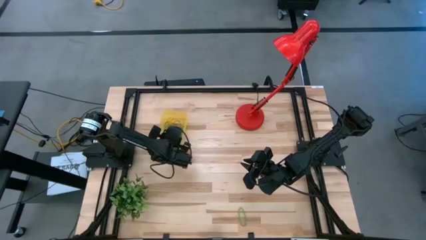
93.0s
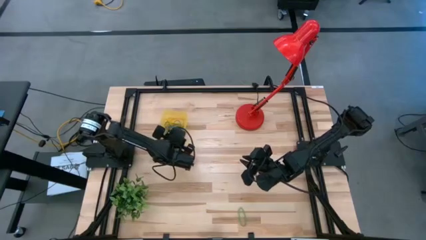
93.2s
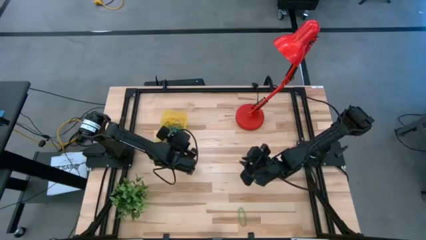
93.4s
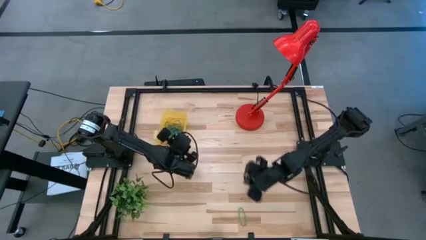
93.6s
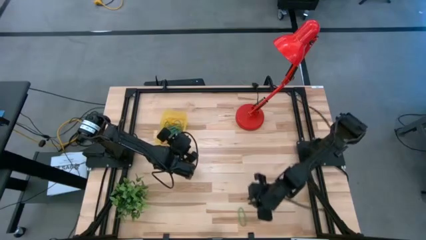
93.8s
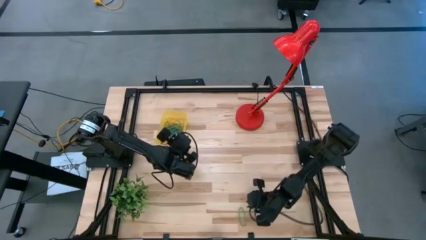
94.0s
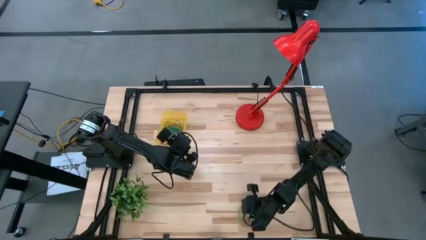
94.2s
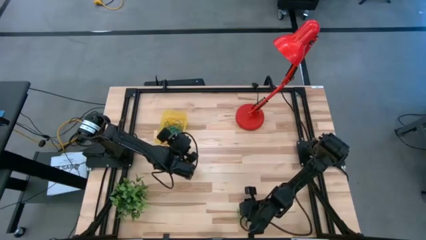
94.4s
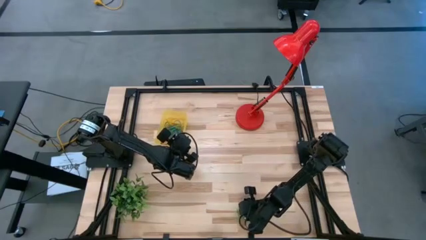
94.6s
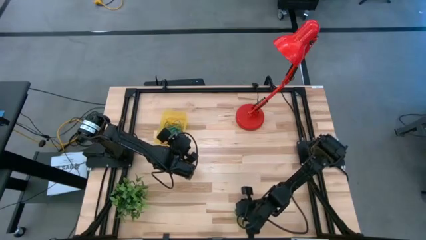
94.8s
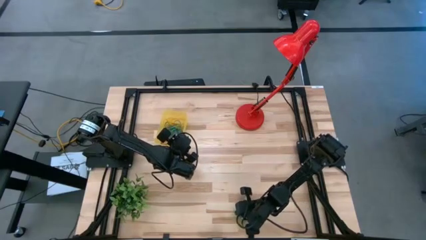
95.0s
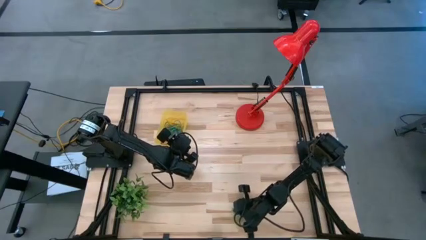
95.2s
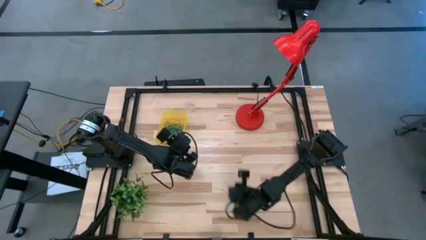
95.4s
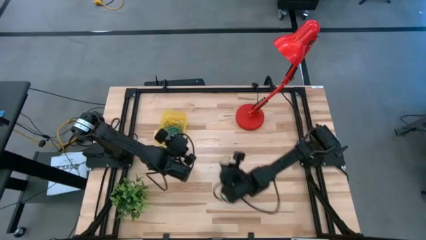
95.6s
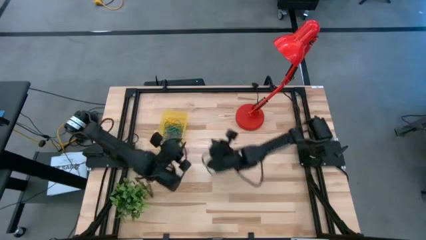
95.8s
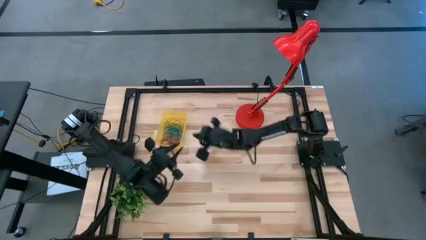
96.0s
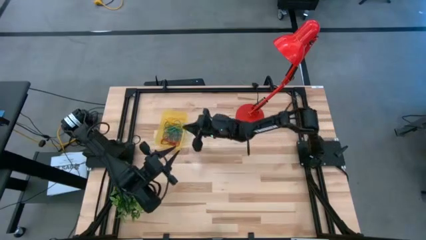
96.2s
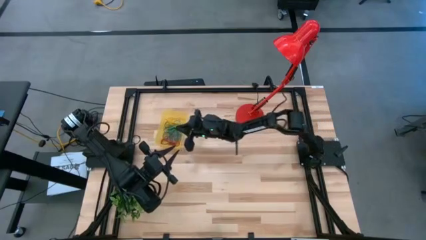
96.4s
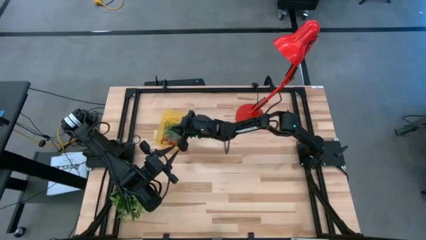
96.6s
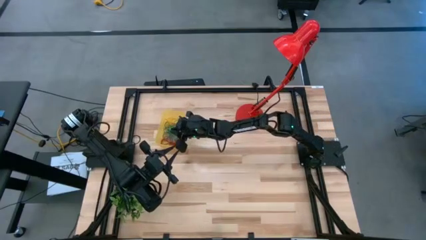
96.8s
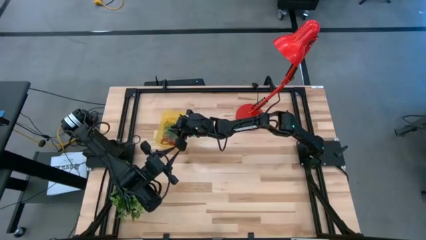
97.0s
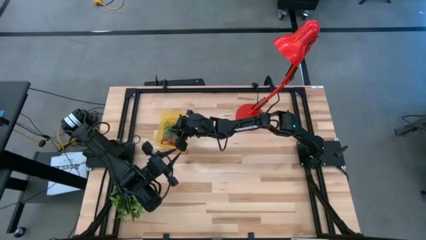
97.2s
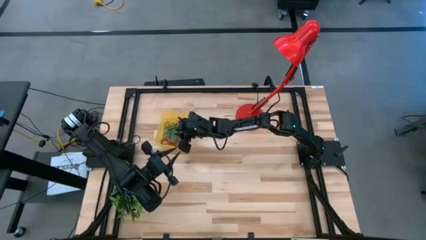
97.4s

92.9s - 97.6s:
Task: Pick and place items into bin
Put the green rubber band into the yellow bin

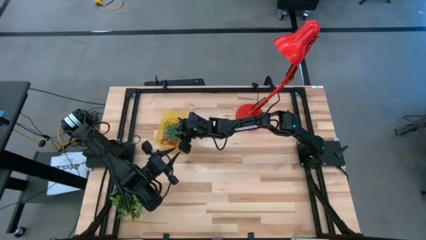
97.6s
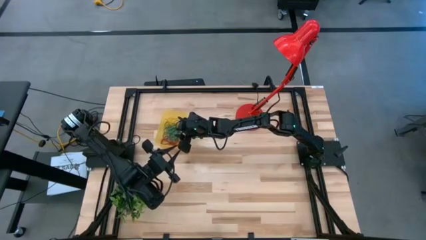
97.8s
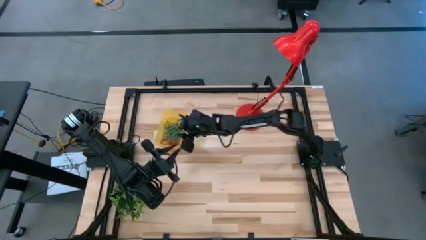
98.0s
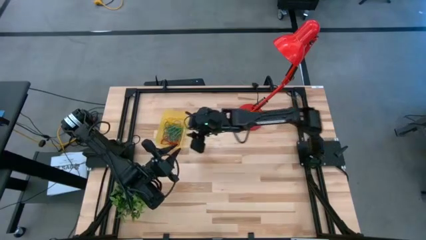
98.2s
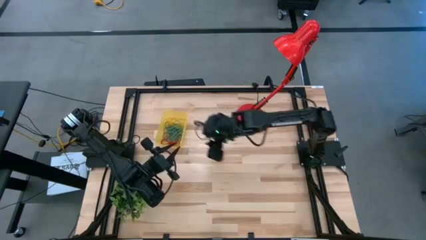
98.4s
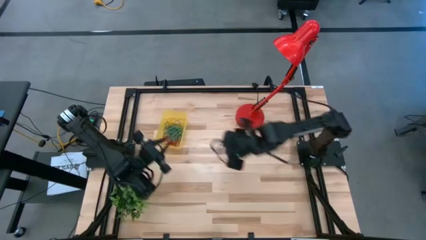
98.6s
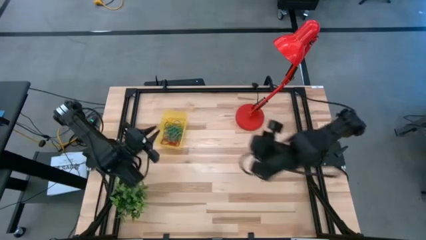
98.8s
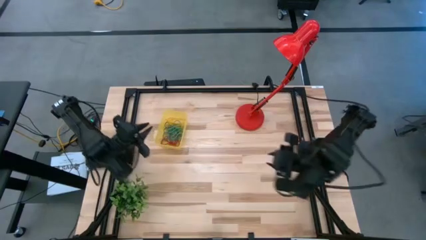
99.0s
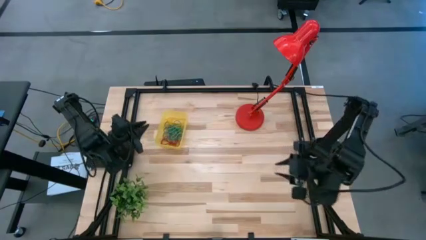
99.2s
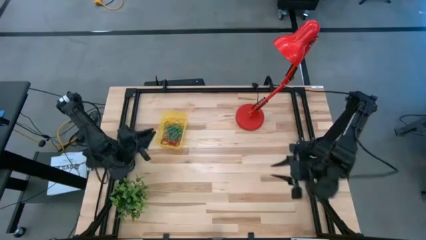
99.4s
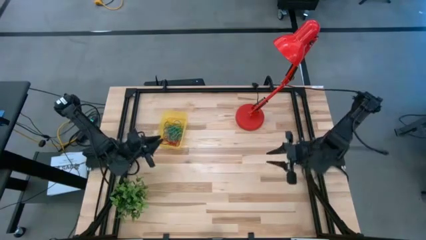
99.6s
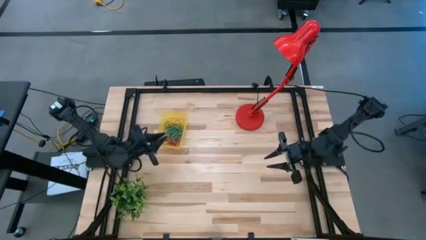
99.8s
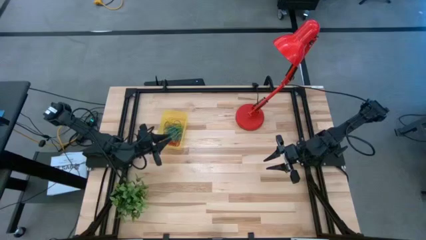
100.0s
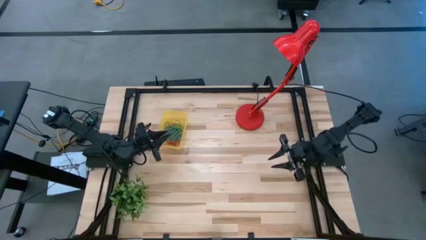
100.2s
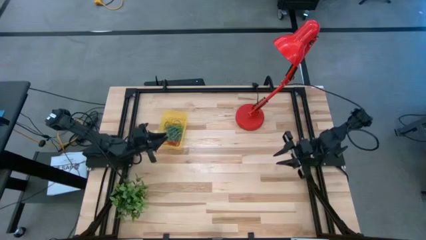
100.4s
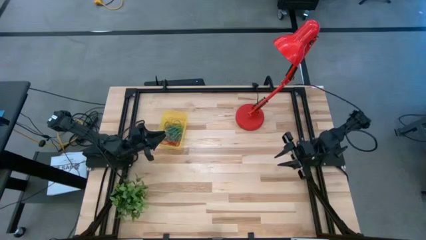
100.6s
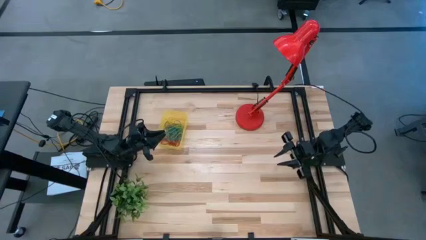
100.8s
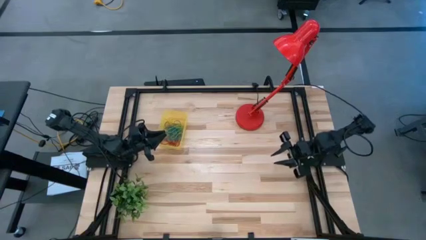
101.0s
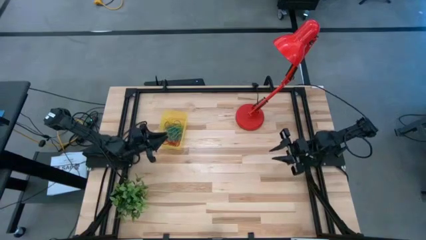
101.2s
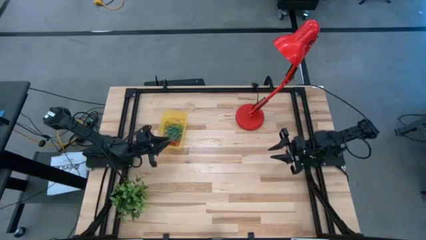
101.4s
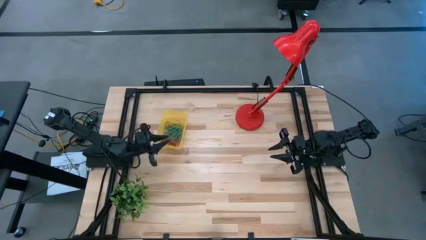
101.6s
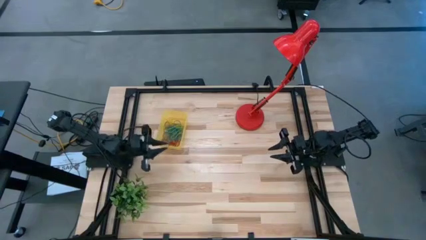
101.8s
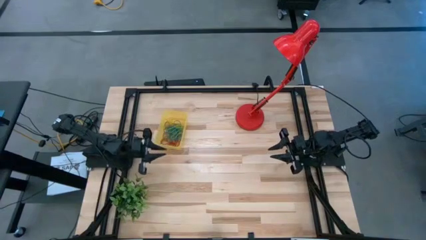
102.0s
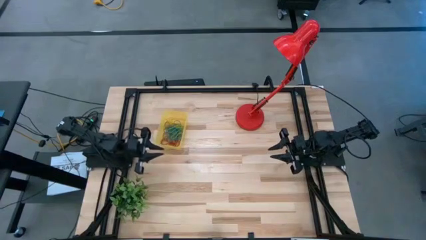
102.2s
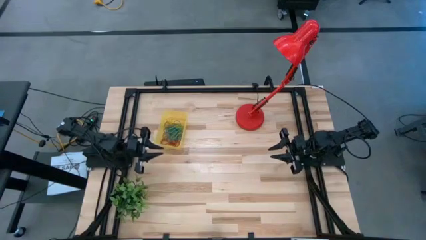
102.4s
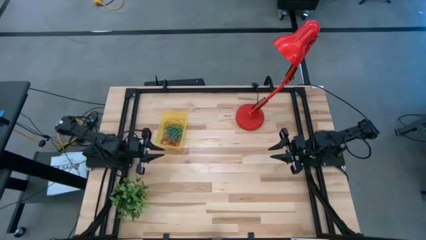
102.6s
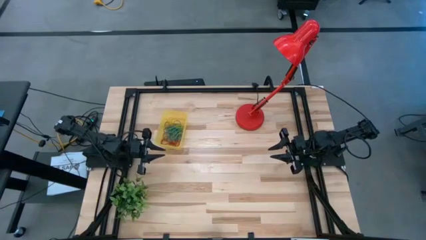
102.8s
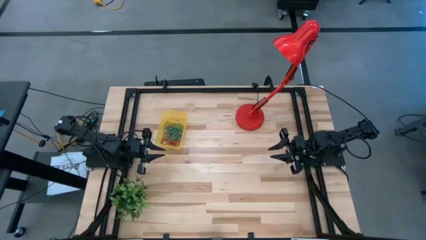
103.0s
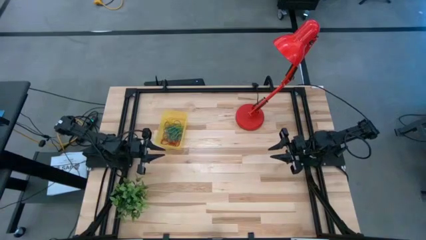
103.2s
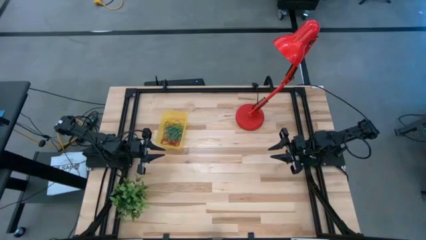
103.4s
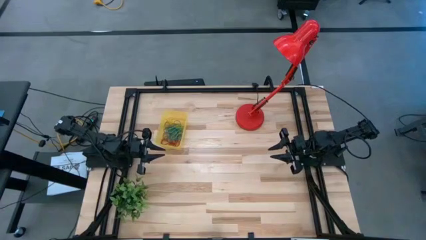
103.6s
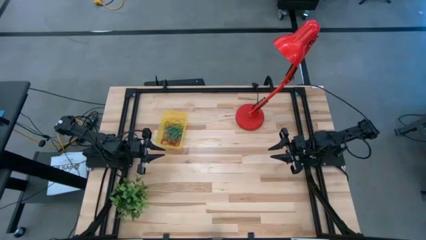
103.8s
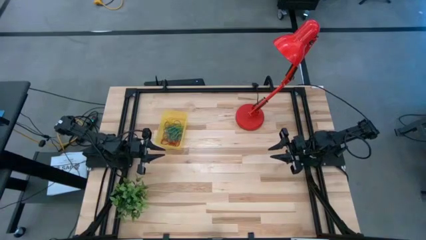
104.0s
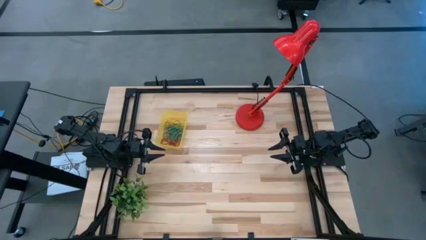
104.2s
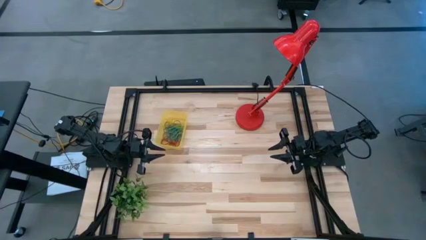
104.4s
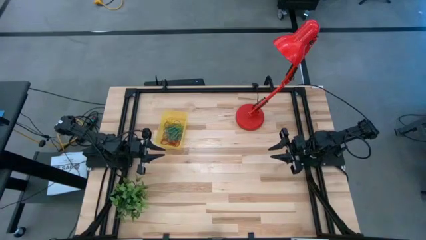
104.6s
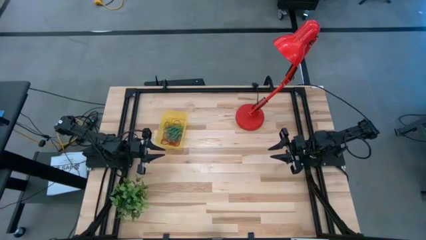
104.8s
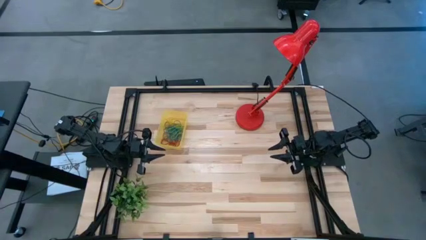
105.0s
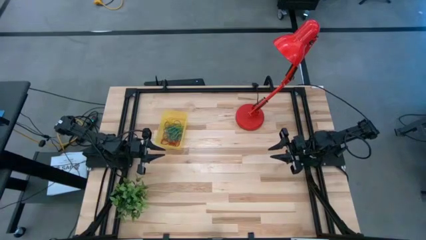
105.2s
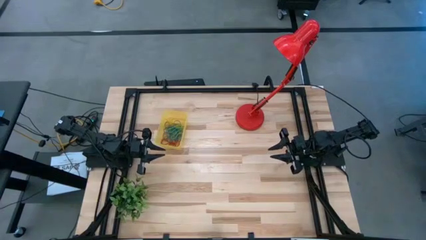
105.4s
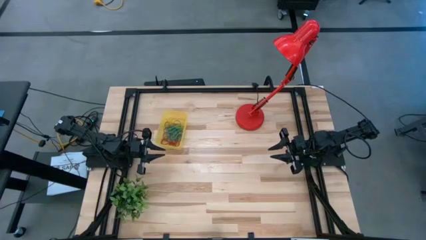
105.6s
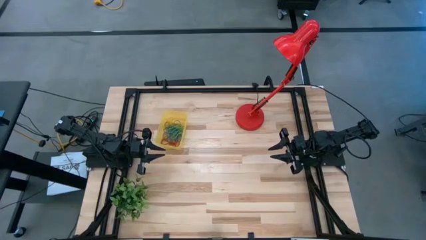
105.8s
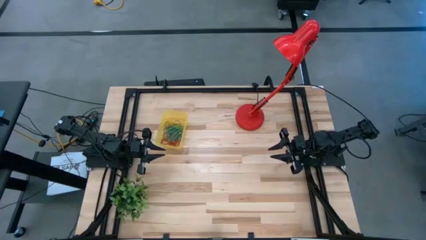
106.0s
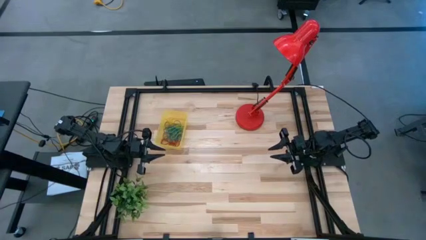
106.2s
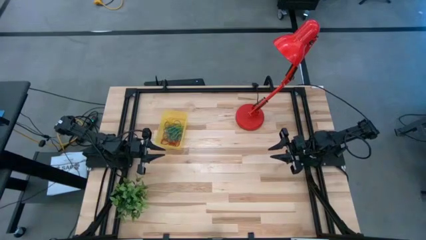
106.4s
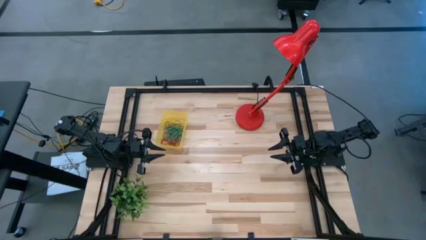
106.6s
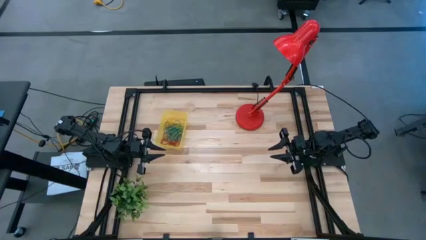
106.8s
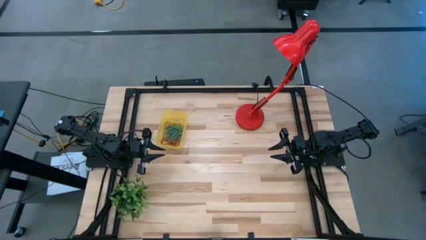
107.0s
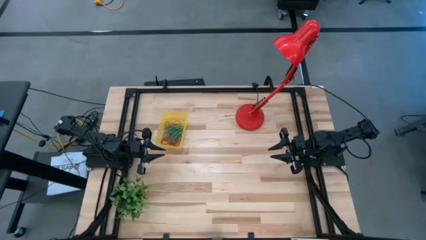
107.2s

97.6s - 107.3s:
Return to Home Position

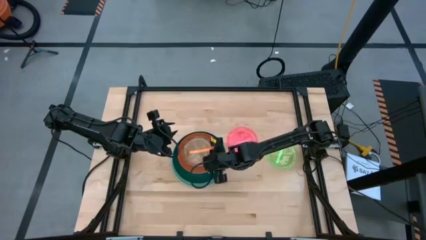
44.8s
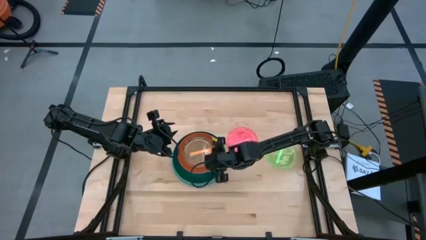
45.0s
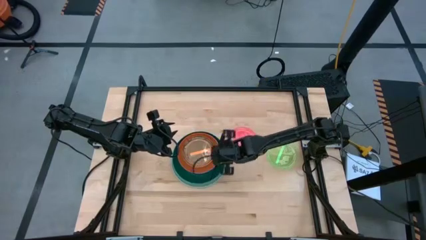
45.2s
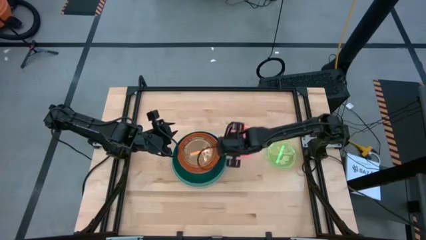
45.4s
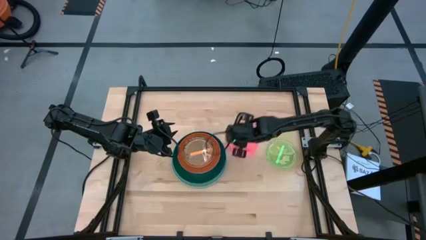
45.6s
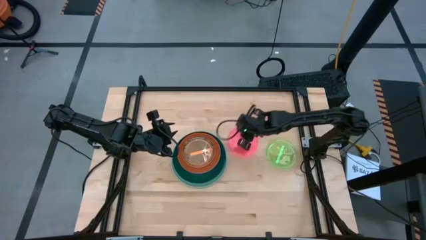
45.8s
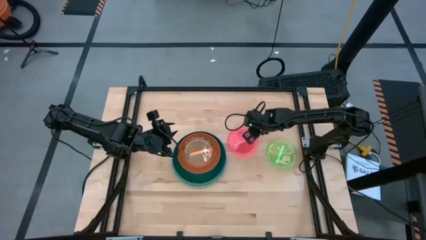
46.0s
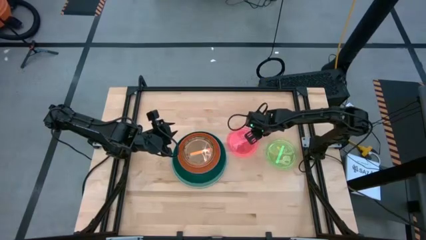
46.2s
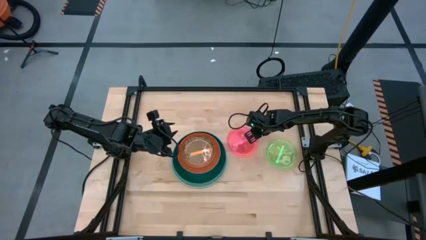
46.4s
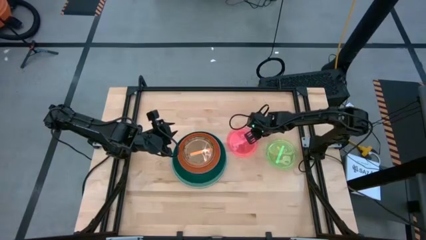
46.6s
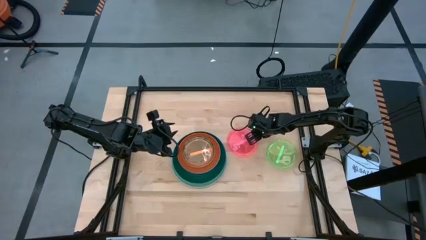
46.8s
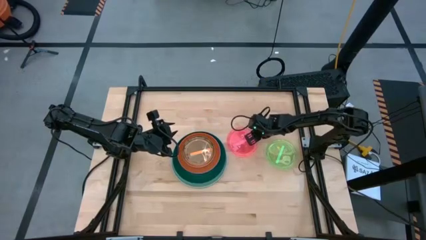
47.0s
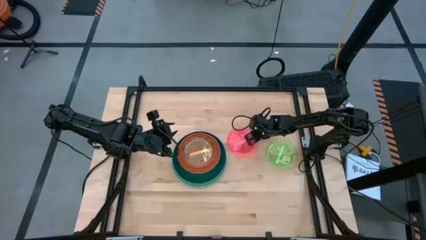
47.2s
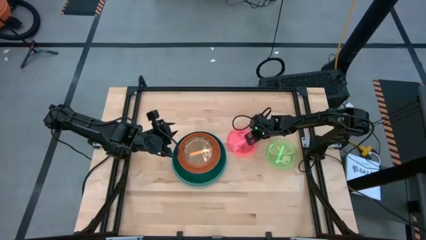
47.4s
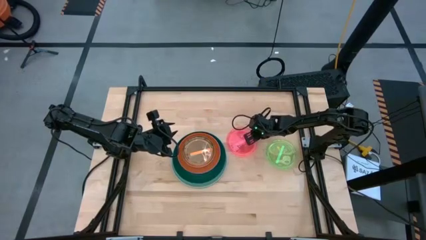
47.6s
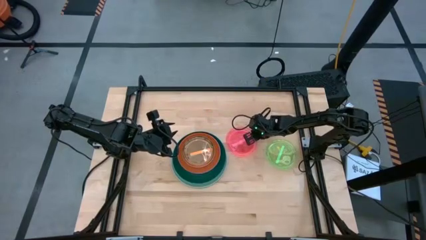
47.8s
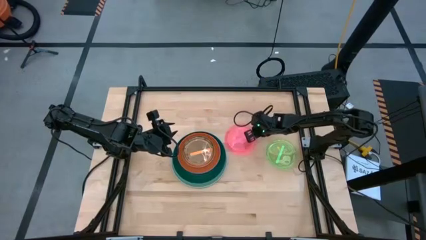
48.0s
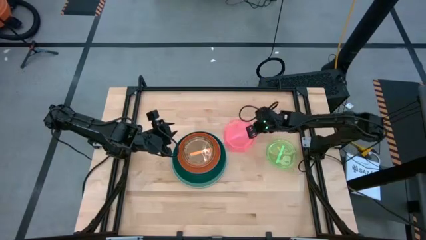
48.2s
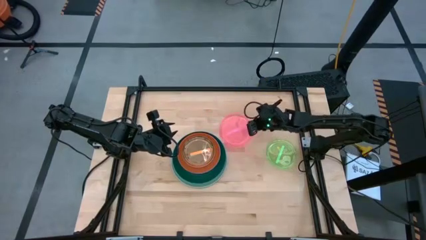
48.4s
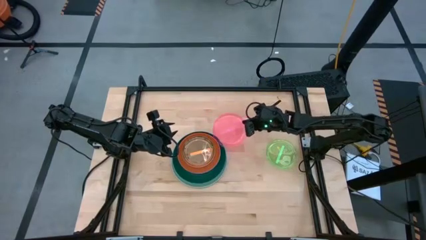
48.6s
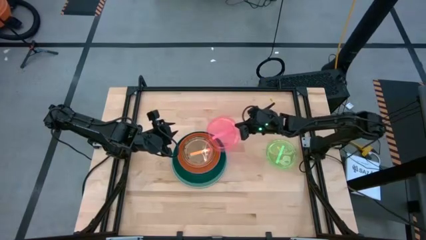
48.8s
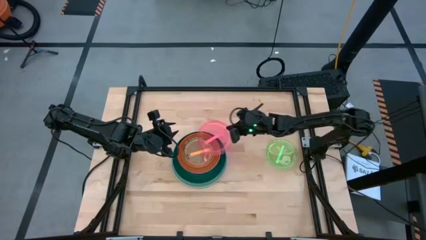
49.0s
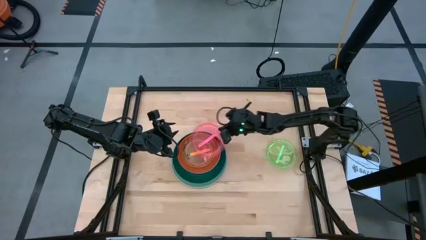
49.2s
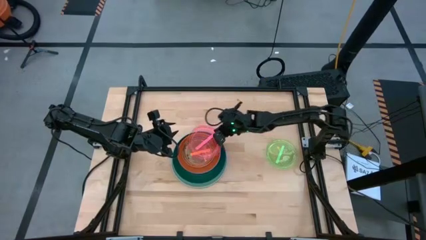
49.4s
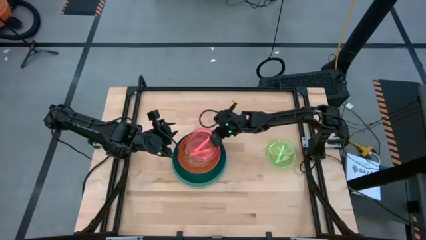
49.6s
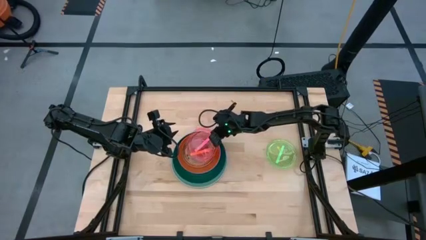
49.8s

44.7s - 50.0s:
Task: Stack plastic plates
Stack the pink plate on top of the light orange plate
